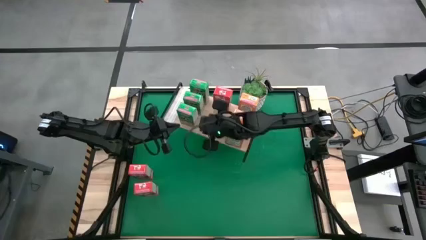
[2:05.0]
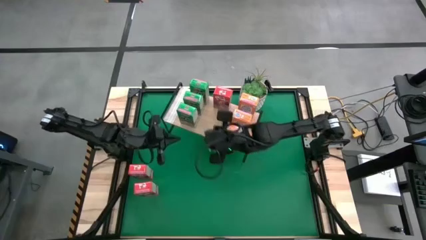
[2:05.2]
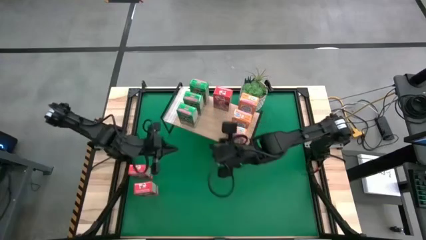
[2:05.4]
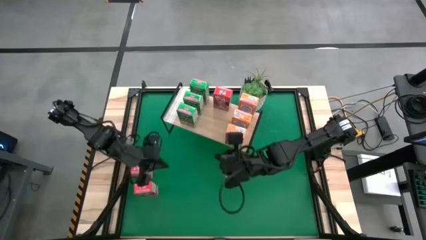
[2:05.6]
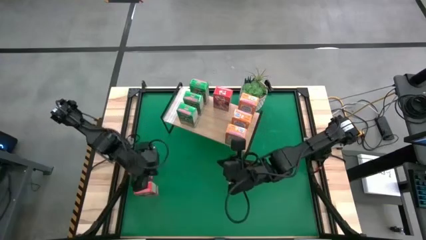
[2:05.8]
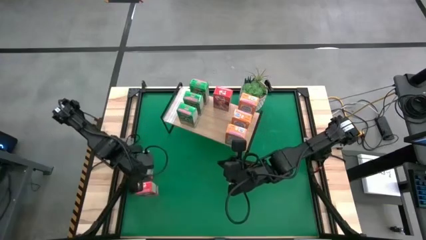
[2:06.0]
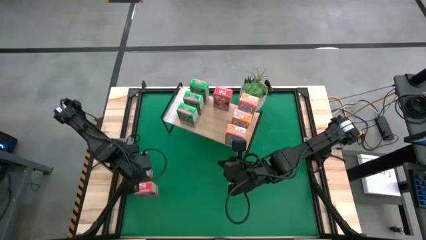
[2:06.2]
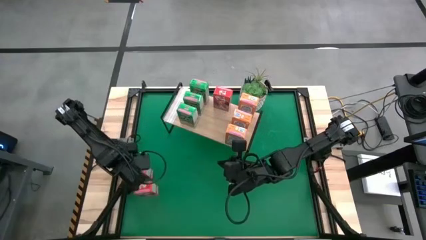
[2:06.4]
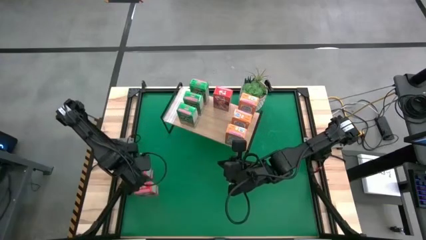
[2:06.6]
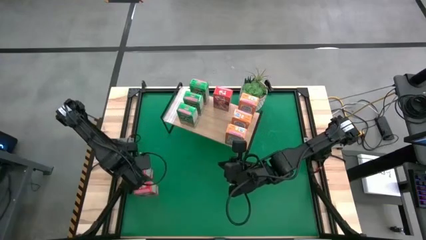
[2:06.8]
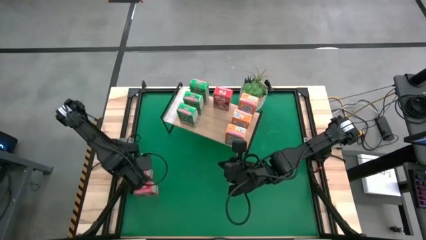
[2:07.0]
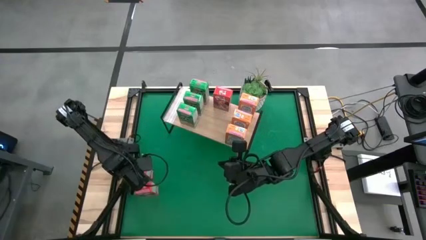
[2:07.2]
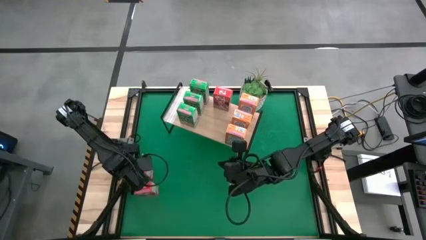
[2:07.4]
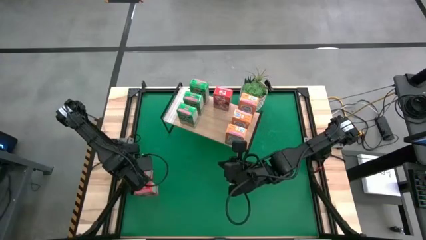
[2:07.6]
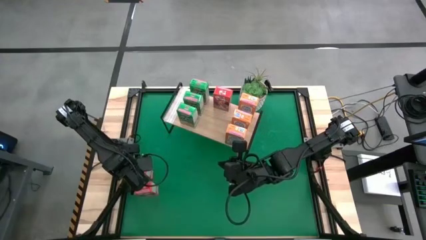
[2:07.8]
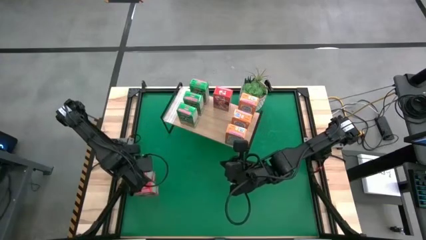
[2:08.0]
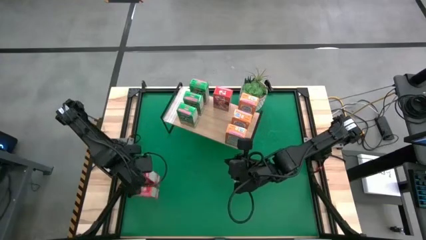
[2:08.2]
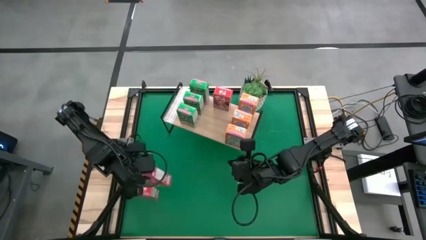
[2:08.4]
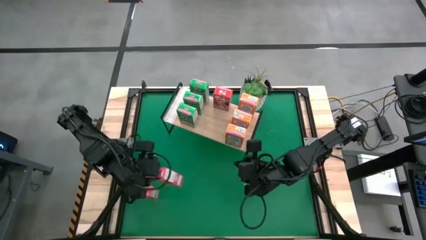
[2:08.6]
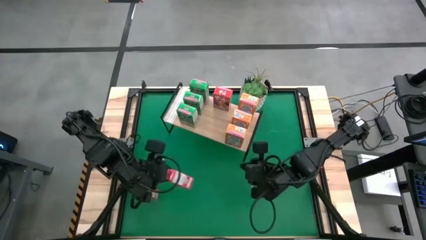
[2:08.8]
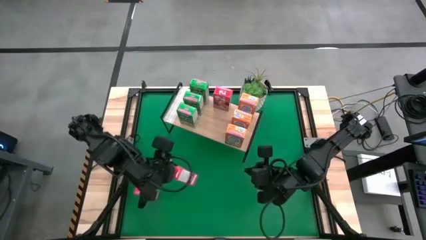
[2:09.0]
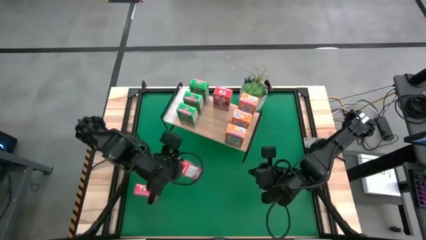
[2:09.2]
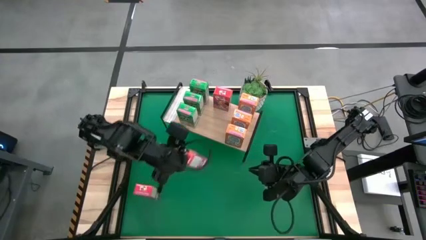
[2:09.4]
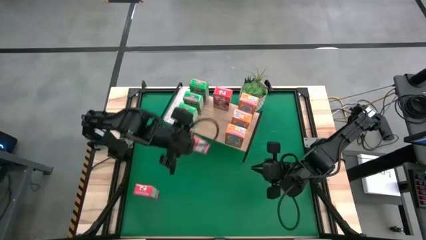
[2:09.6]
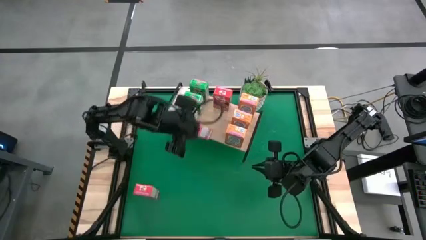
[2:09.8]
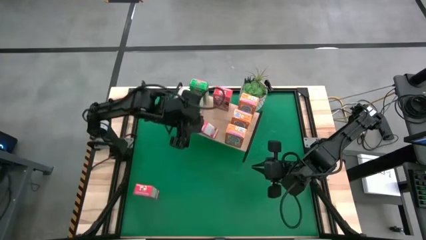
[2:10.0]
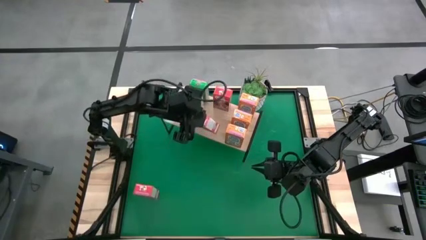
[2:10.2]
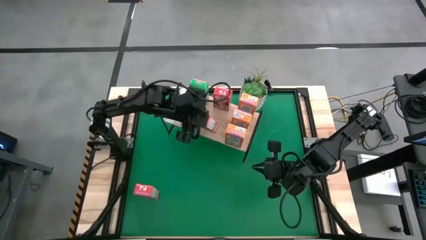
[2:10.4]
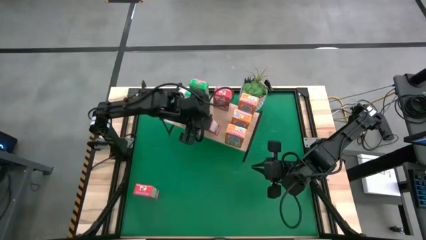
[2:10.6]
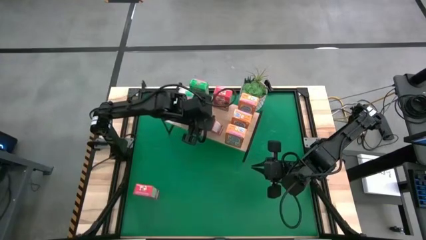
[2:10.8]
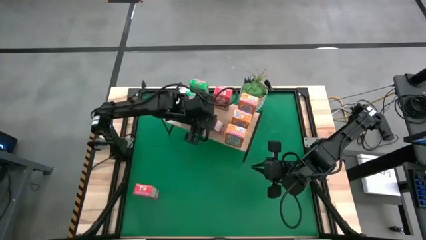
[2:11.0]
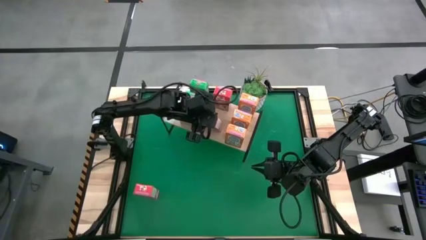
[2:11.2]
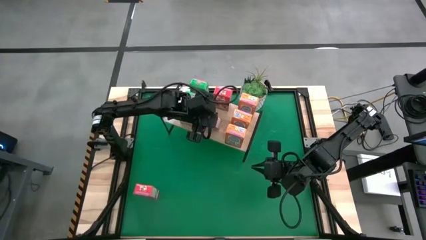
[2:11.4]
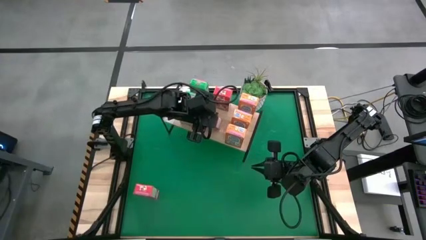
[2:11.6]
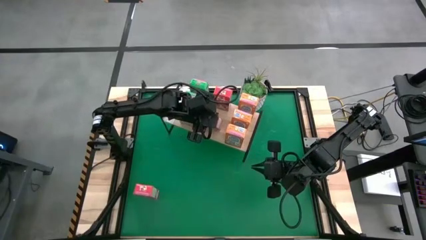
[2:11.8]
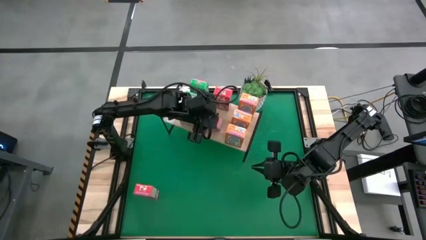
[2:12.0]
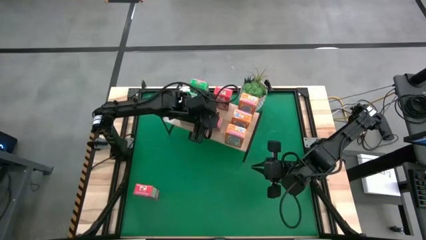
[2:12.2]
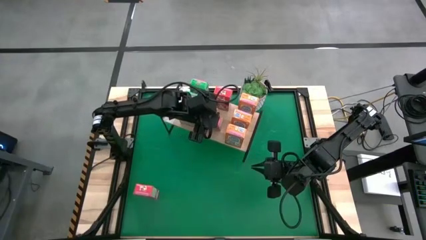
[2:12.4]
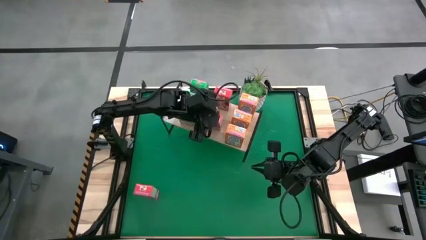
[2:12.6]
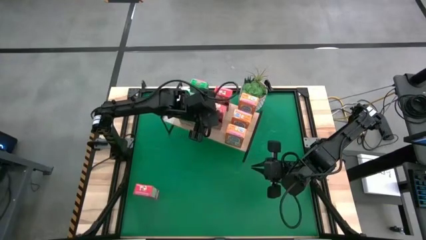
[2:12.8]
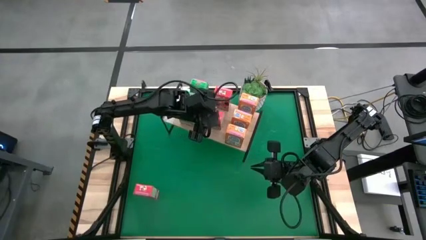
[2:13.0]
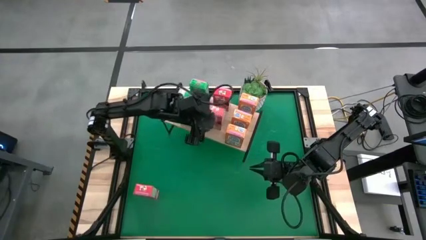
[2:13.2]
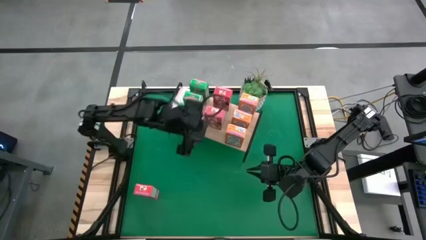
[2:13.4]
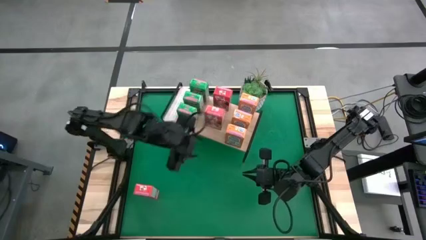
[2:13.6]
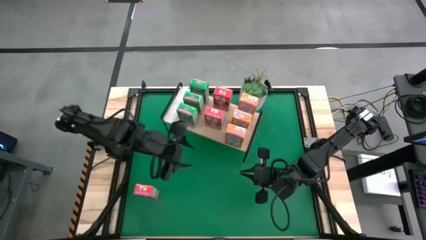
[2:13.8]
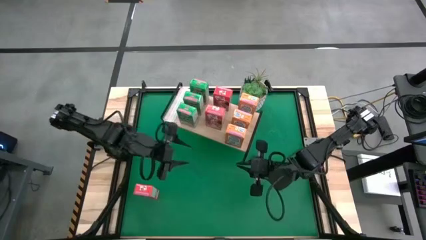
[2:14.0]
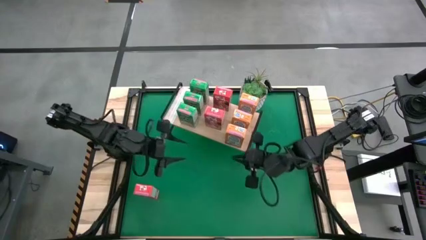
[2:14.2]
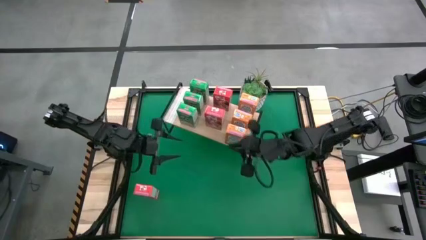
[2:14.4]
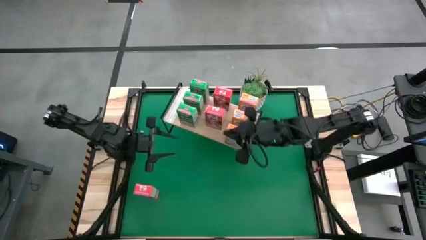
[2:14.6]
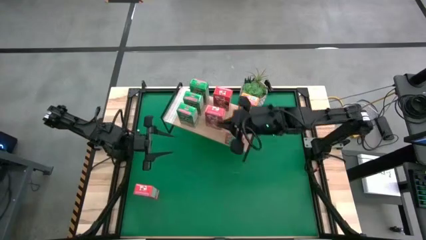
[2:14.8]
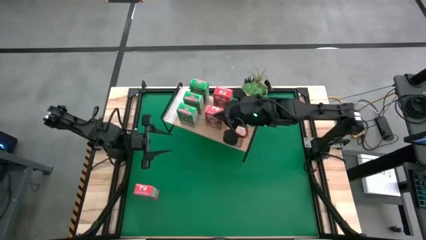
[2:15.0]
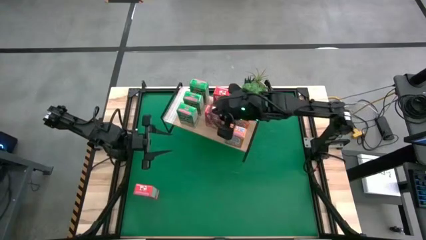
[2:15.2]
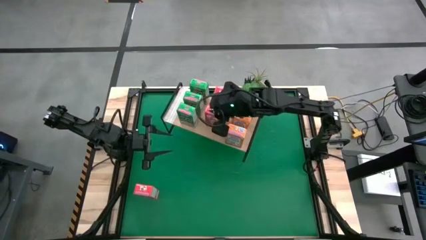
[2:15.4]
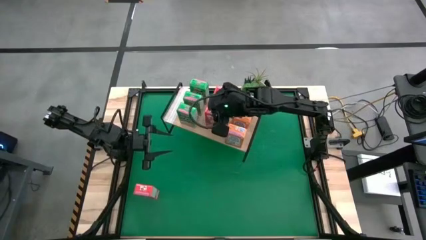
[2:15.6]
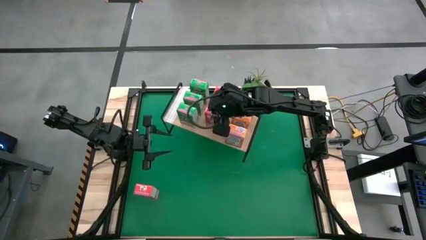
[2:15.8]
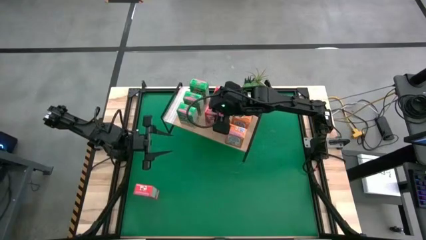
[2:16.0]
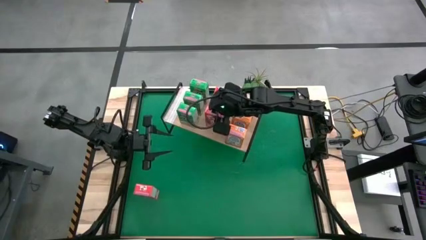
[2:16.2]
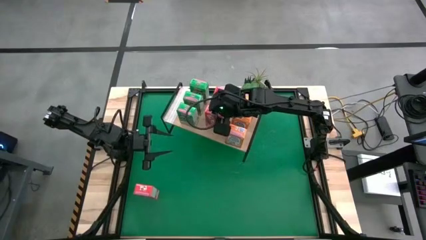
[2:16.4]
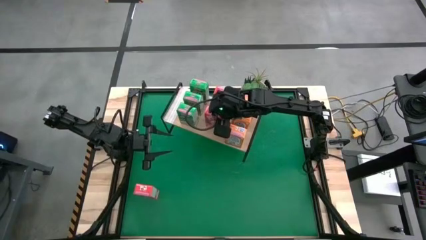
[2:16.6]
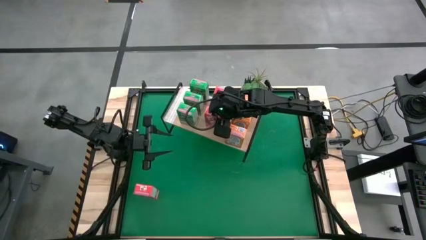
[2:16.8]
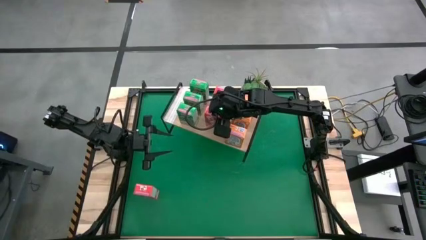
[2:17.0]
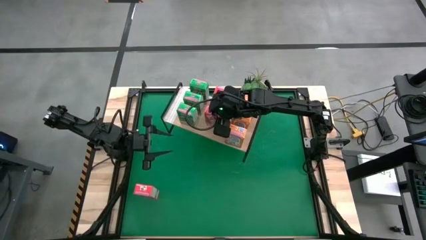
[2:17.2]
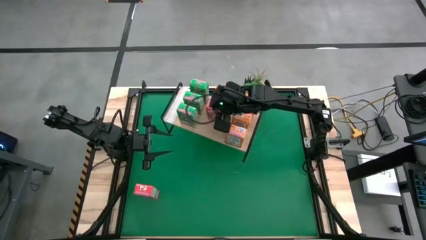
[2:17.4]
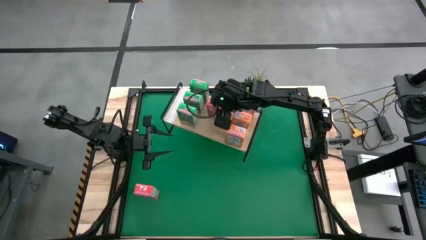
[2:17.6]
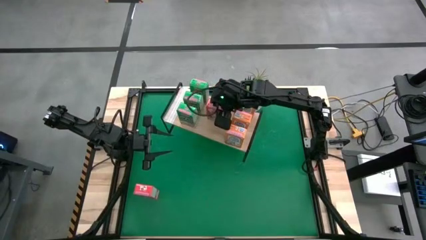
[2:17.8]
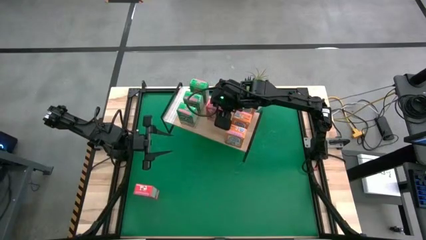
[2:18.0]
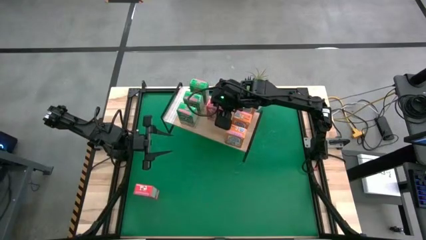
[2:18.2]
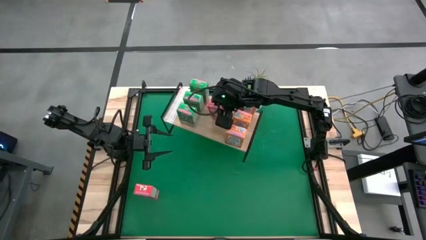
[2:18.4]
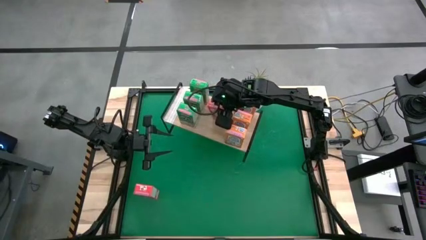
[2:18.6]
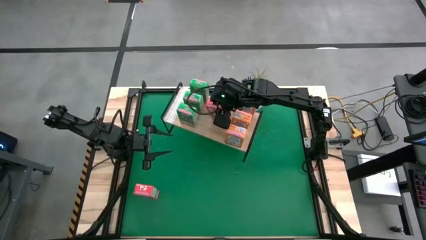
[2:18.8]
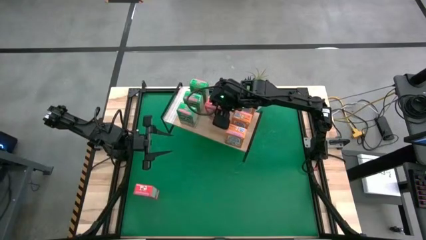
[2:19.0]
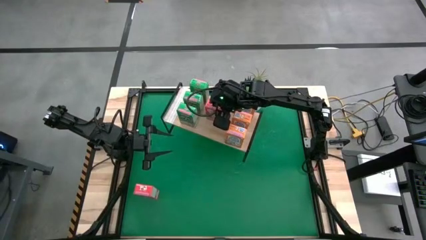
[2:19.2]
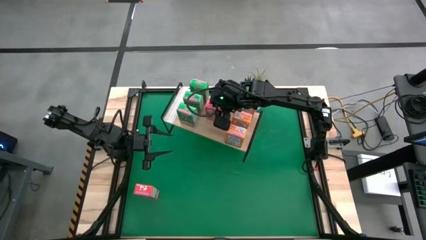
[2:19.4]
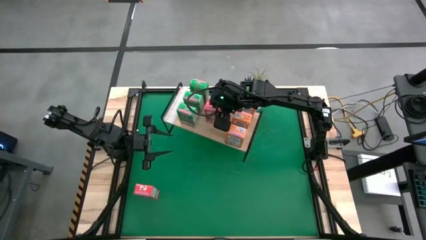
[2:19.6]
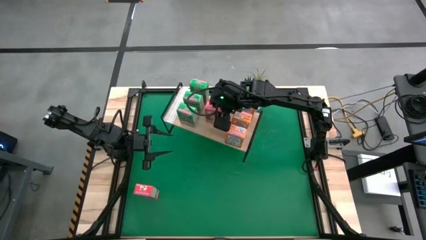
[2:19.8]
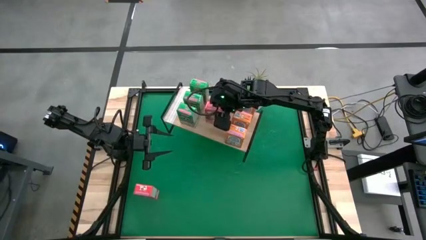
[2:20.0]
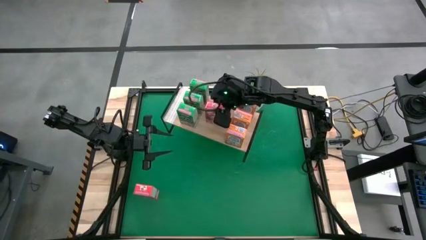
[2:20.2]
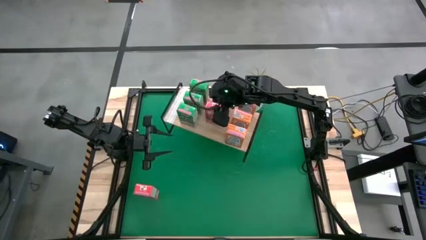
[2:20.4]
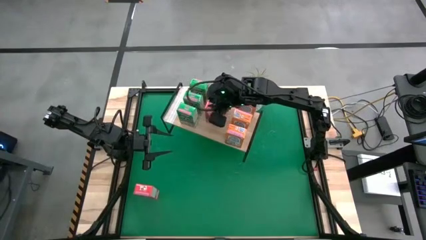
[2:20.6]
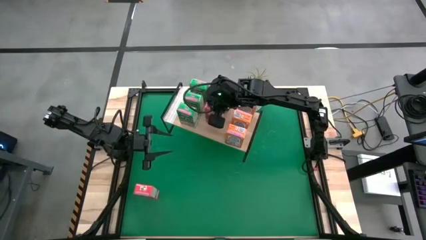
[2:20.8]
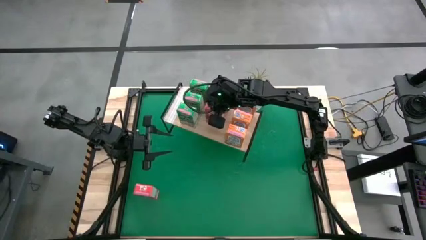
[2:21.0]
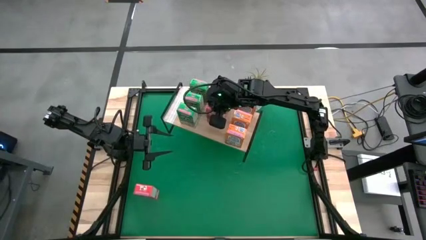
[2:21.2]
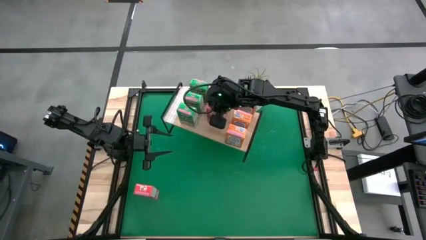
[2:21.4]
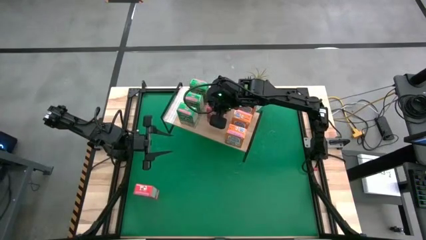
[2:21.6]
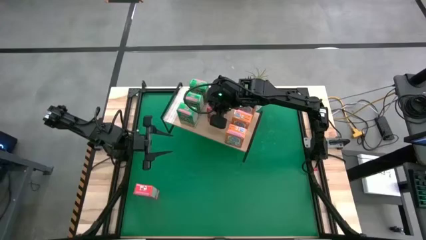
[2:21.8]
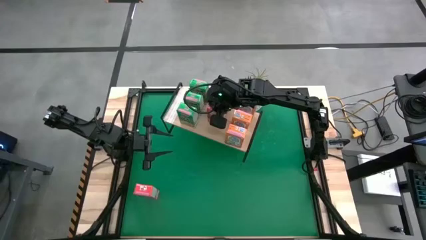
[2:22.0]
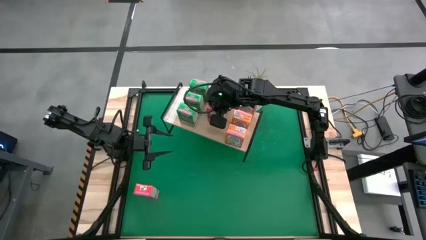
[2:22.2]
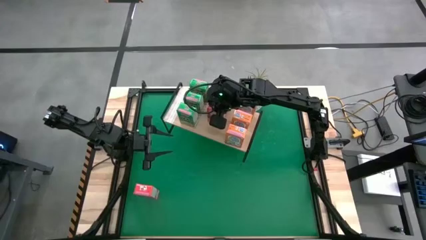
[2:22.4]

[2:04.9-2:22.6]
Task: Stack cereal on shelf
Put the top red cereal box aligned with the other red cereal box on the shelf
